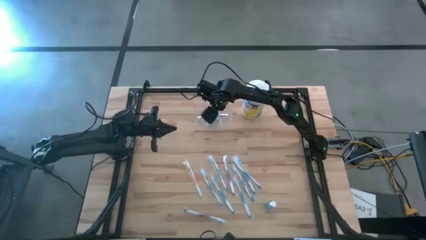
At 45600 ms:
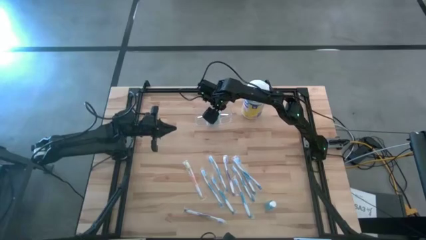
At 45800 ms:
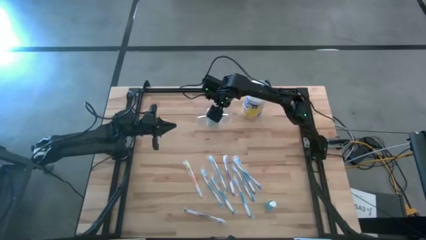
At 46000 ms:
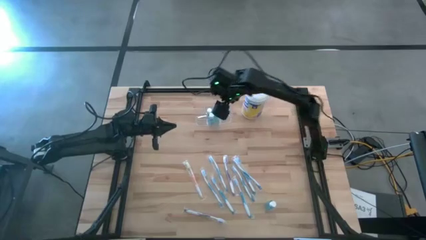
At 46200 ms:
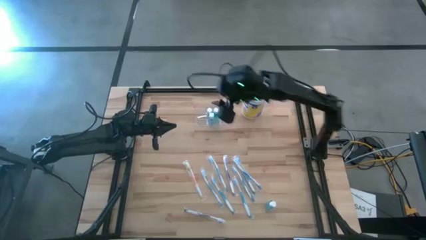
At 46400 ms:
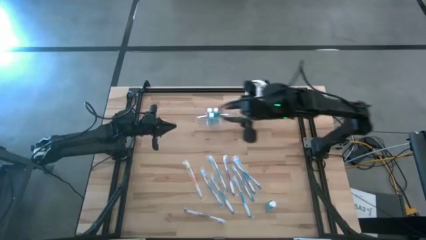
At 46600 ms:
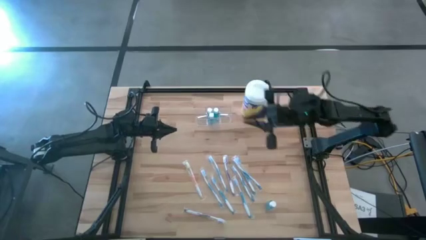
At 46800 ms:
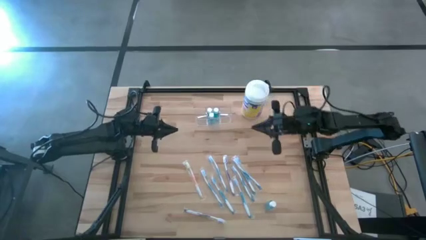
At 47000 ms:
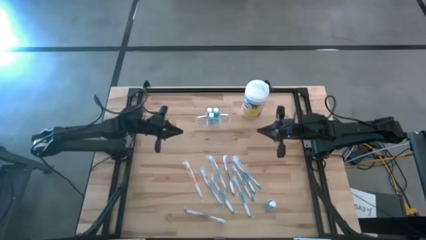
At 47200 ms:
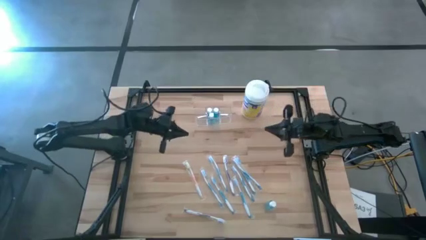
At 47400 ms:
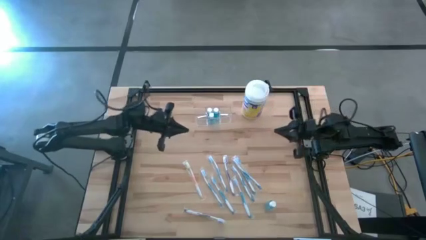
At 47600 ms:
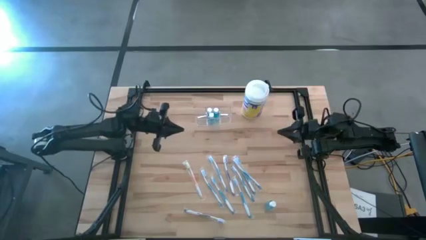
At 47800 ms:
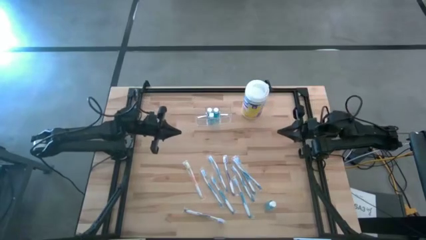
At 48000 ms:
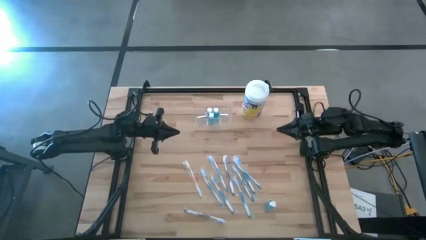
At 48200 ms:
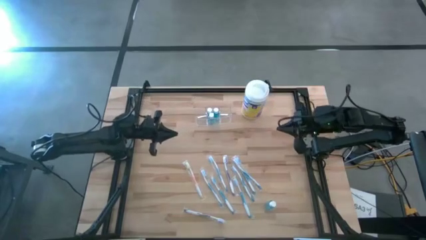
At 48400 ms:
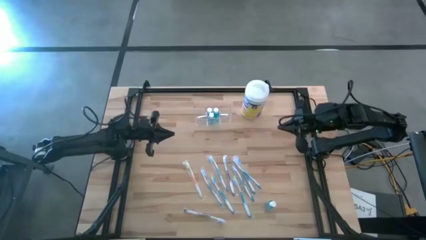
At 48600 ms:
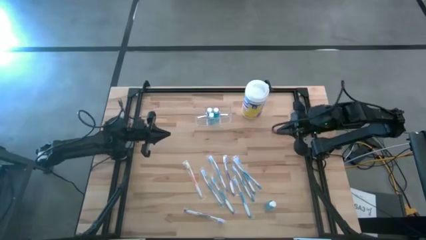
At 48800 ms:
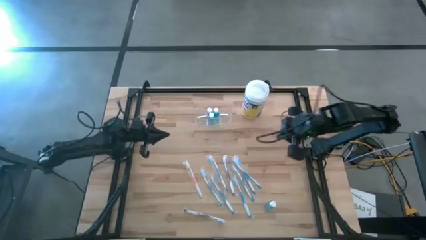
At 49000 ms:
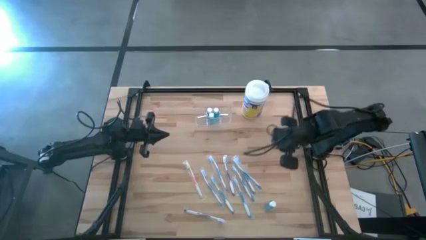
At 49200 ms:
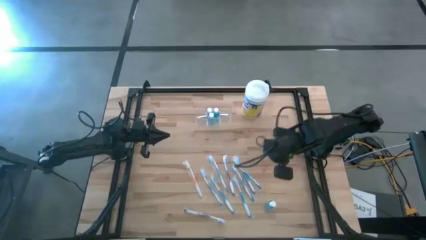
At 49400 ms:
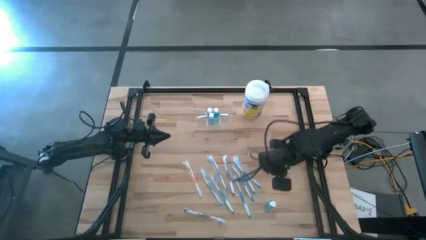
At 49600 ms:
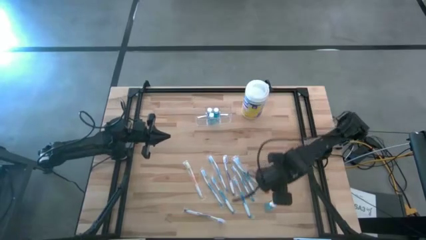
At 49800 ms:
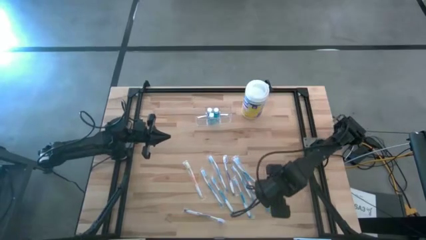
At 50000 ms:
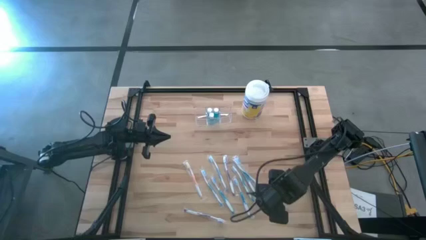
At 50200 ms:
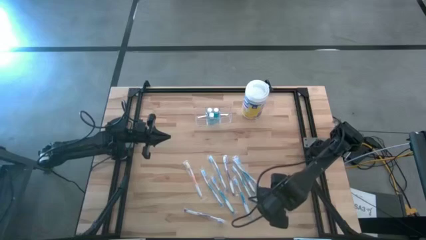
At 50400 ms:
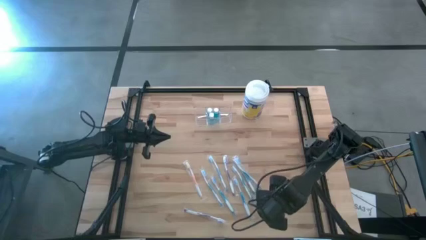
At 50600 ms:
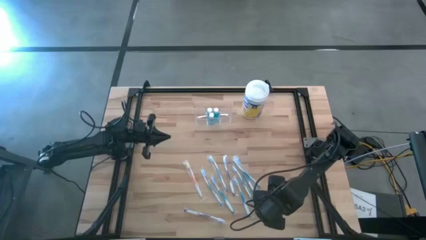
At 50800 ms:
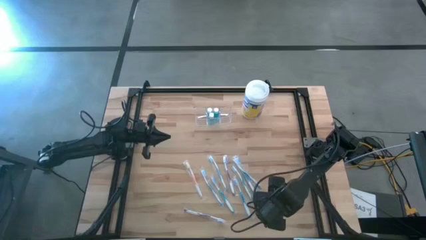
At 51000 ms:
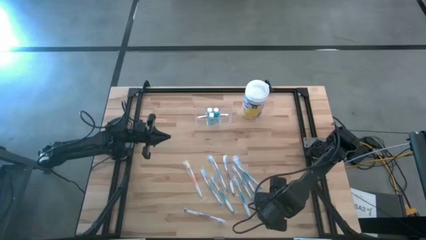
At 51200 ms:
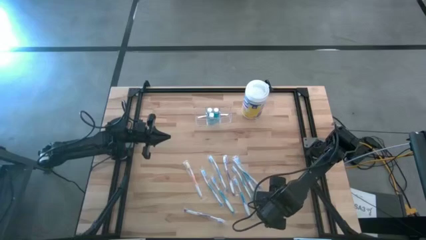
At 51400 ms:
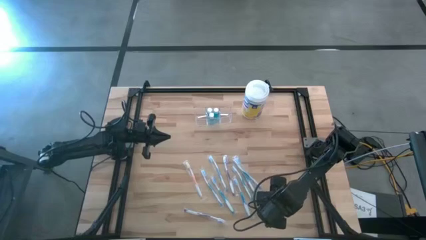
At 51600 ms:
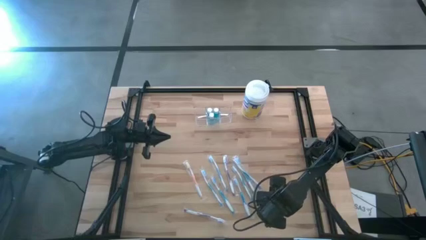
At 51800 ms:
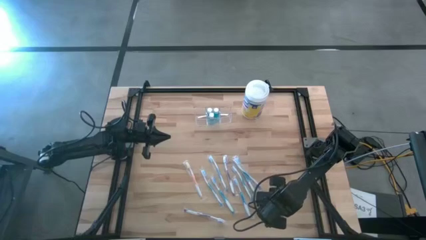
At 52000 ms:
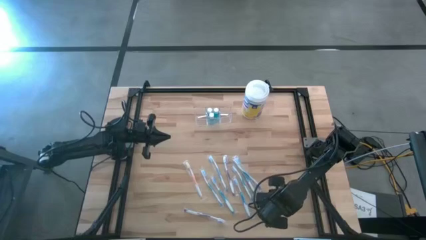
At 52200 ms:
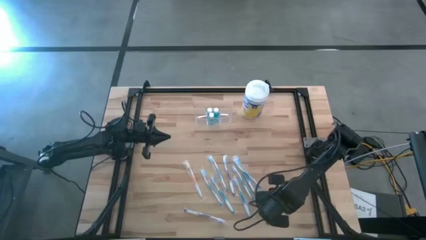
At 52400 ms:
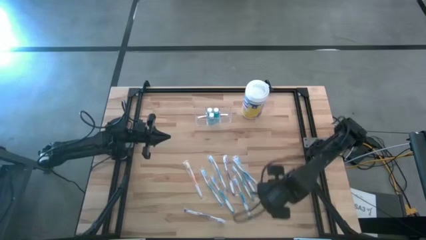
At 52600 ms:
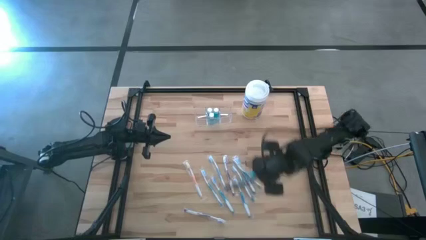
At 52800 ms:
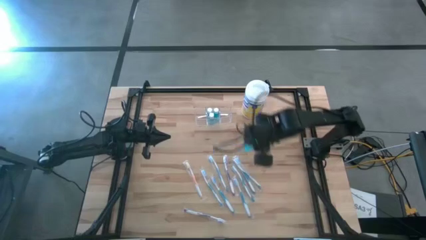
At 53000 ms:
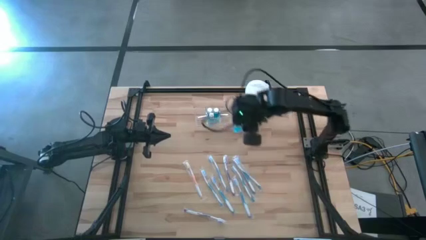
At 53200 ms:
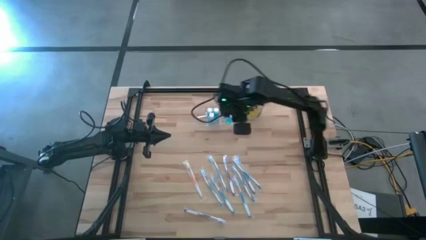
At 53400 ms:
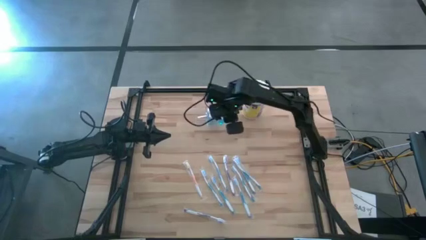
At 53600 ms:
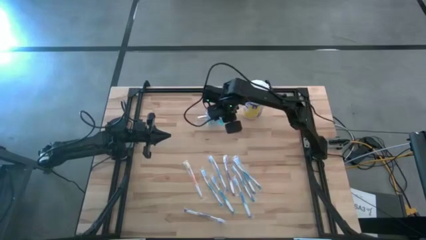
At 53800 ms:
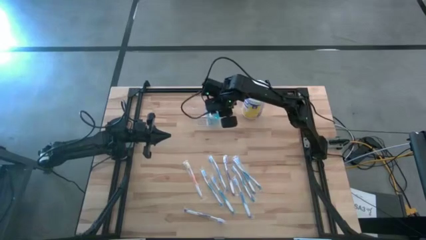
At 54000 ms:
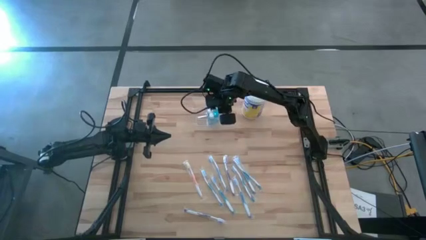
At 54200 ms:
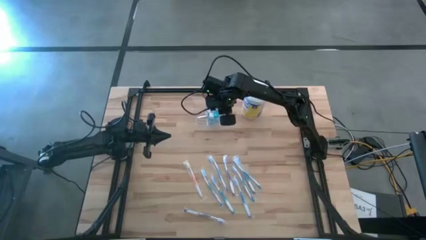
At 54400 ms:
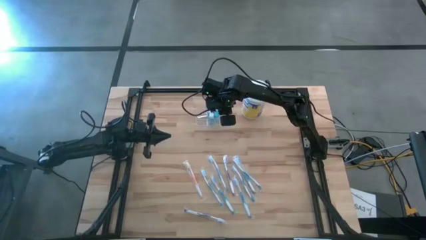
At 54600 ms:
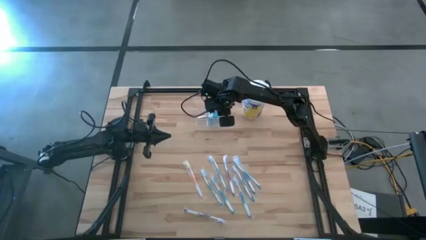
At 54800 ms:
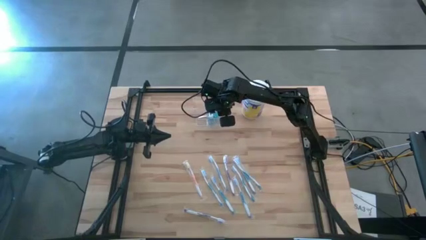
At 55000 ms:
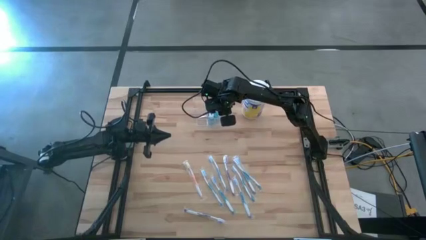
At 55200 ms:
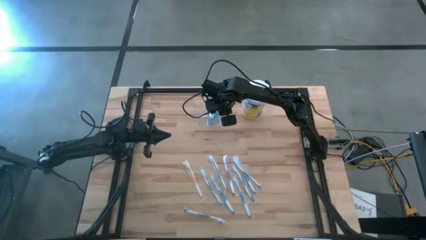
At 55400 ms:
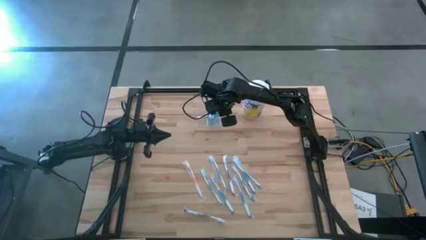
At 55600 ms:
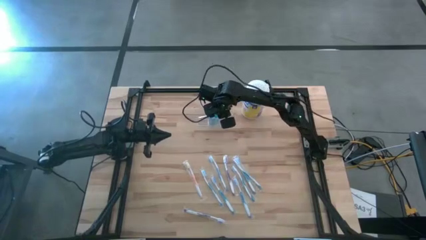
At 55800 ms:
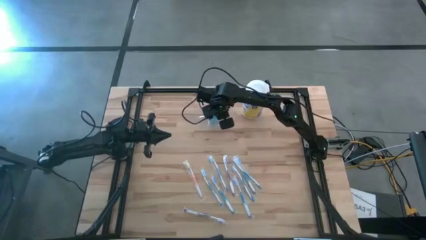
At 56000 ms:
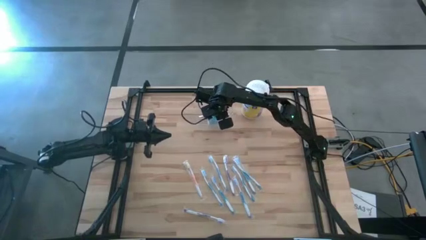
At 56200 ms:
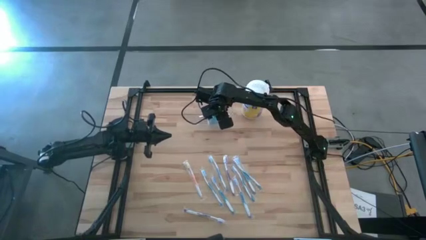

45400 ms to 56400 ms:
Task: Pick & Place toothbrushing station
Put the blue mouthwash bottle into the transparent toothbrush holder

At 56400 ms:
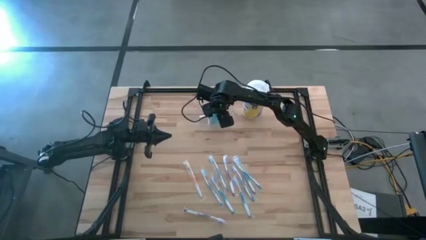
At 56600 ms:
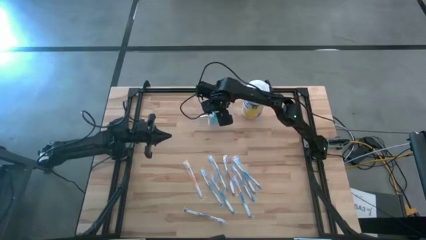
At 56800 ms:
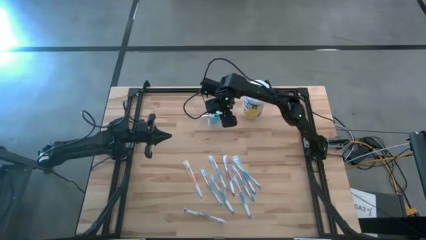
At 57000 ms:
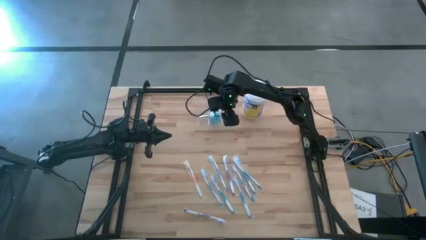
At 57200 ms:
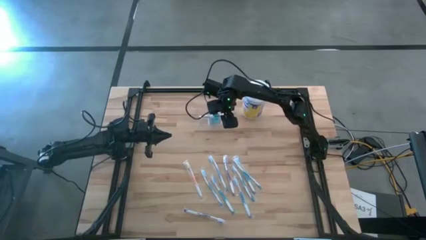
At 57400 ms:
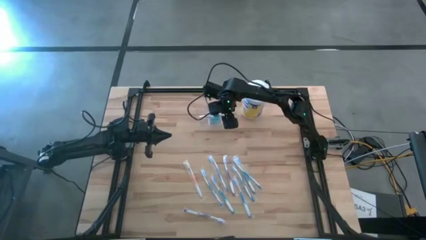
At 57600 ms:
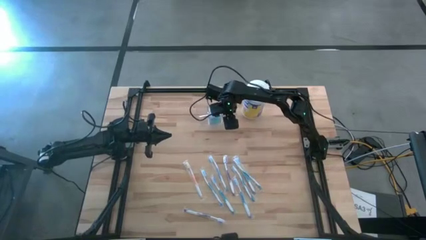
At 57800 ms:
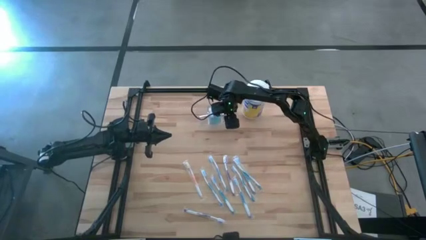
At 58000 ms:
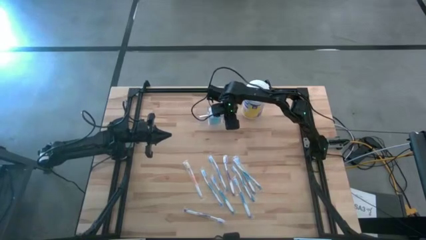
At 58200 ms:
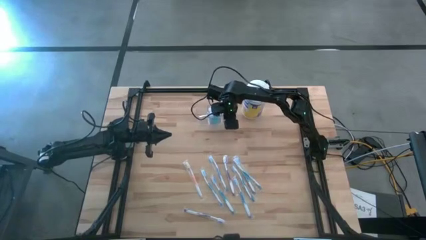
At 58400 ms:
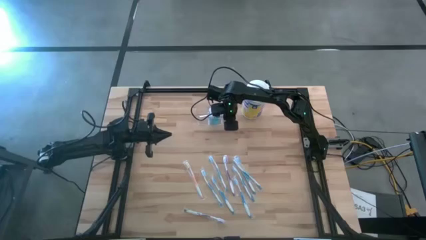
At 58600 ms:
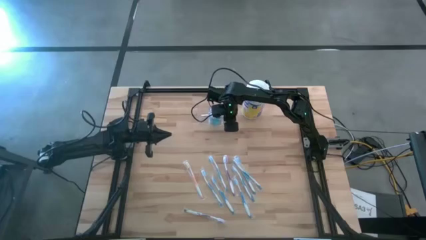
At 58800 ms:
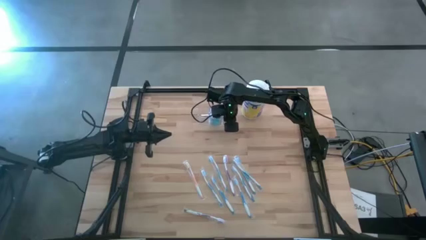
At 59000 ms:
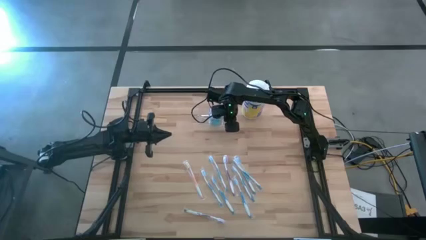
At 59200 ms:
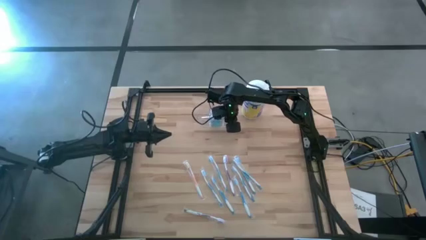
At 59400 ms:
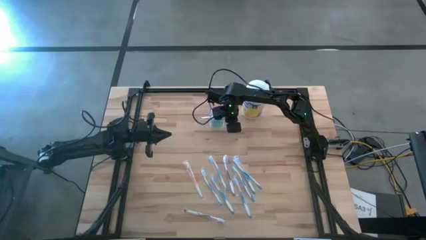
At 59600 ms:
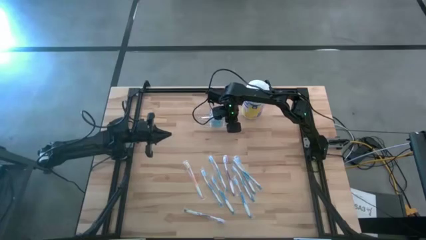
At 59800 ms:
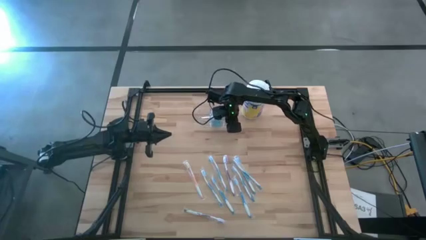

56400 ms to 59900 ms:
Adjust the transparent toothbrush holder

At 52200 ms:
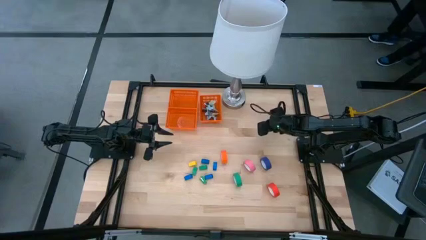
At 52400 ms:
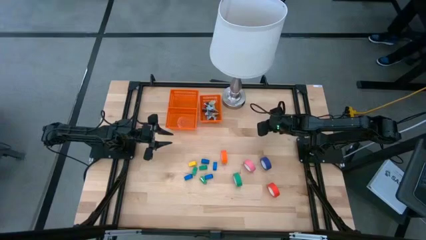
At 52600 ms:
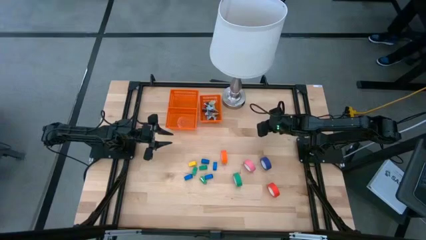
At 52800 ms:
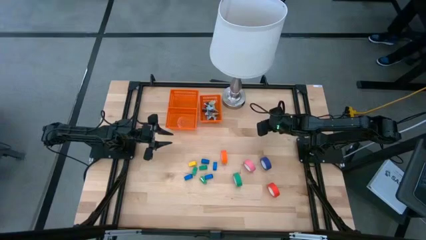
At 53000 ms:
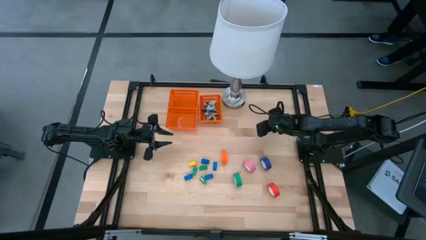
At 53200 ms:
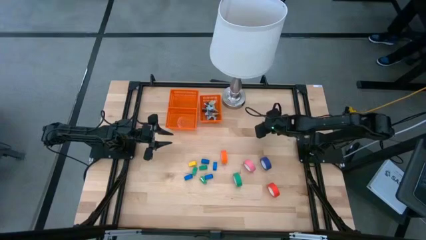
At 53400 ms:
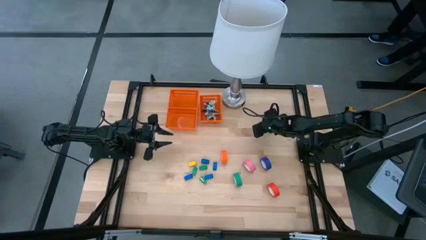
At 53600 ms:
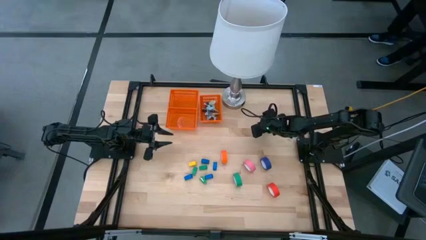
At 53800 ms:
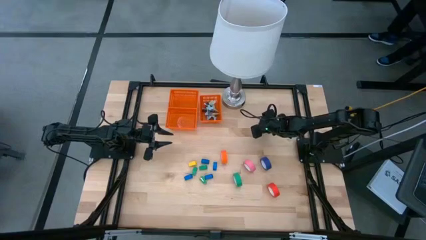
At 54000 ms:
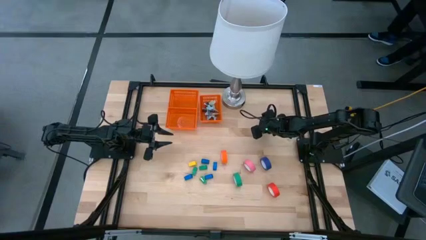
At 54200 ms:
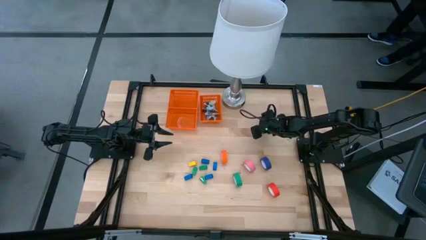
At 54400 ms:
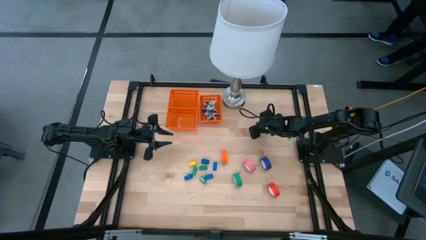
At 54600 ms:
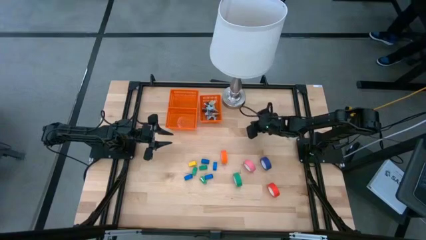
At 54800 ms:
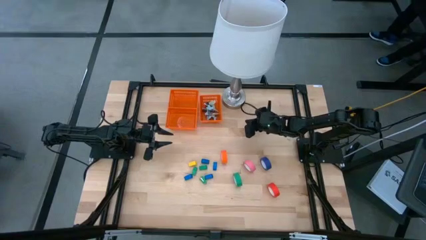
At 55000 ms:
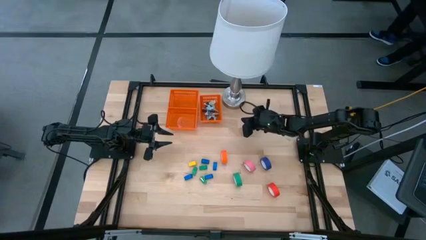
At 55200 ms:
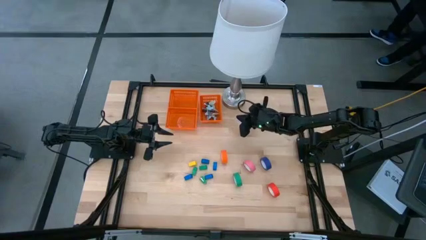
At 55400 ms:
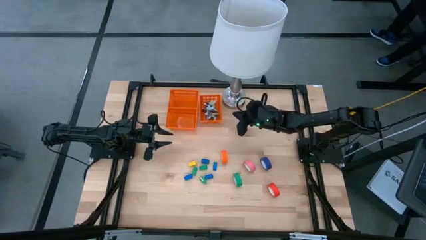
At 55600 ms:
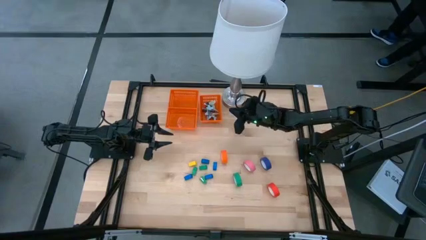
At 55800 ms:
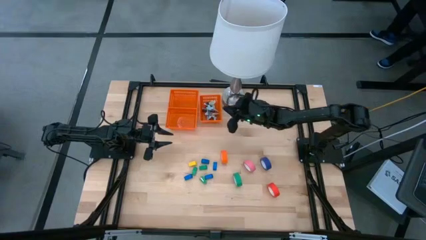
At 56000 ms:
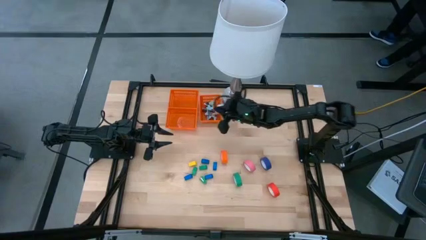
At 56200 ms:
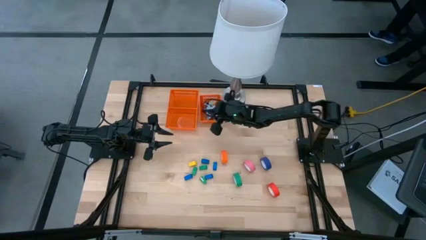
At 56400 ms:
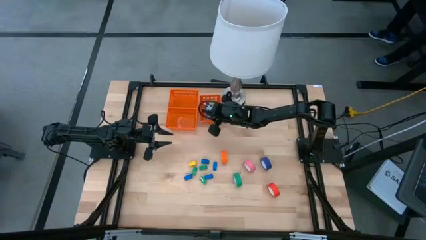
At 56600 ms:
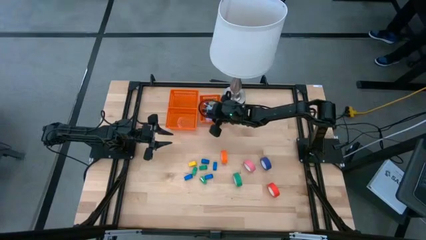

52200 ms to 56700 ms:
Task: Pick and place Stapler, Stapler remover, tape
Put the purple staple remover into the right orange basket
